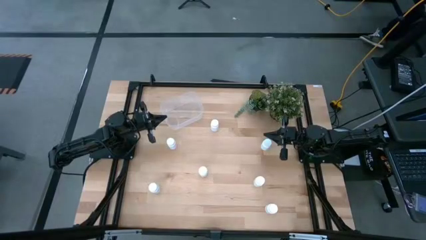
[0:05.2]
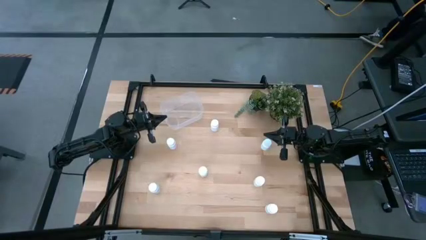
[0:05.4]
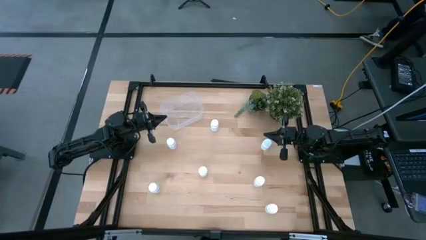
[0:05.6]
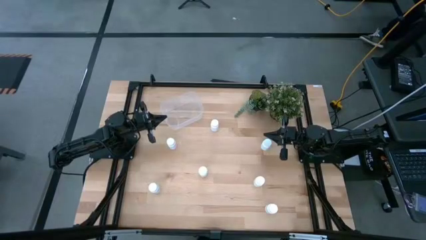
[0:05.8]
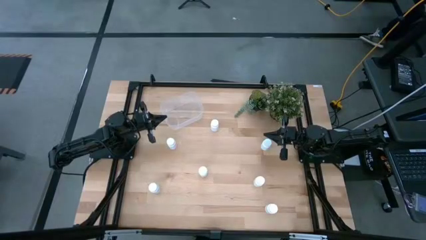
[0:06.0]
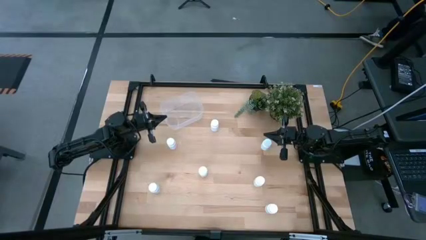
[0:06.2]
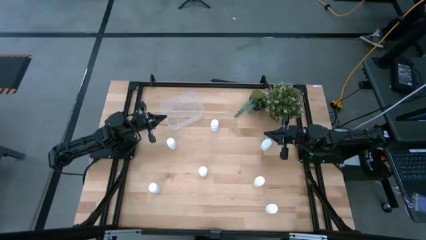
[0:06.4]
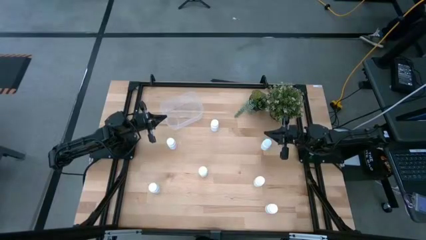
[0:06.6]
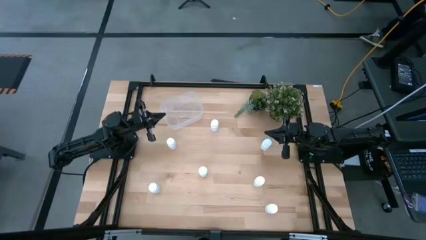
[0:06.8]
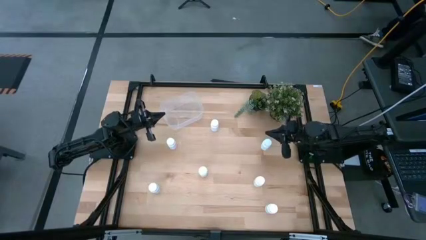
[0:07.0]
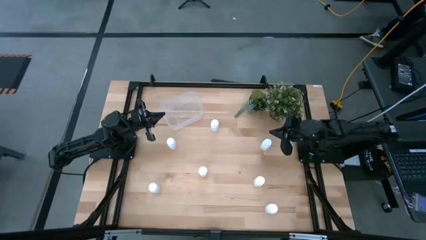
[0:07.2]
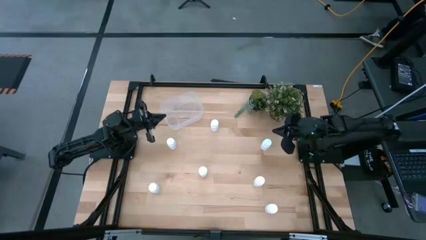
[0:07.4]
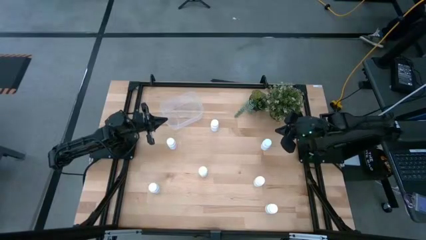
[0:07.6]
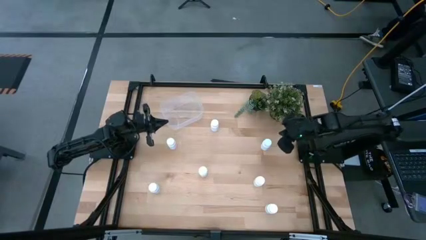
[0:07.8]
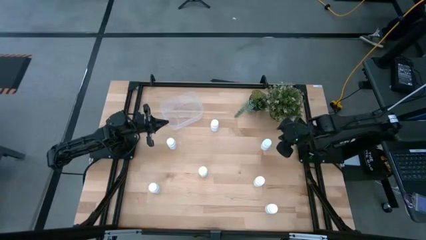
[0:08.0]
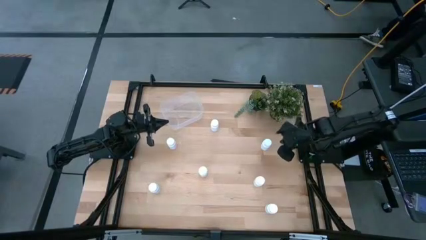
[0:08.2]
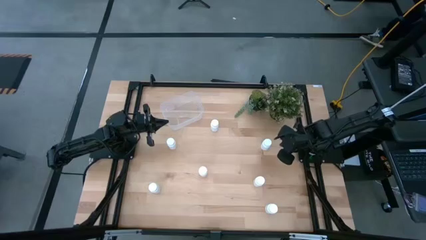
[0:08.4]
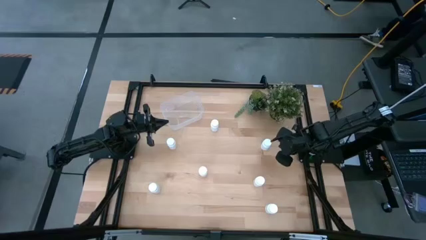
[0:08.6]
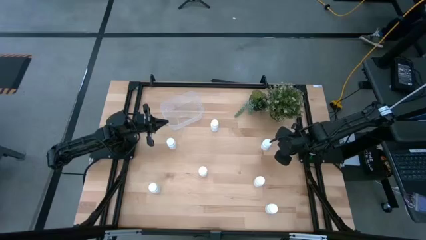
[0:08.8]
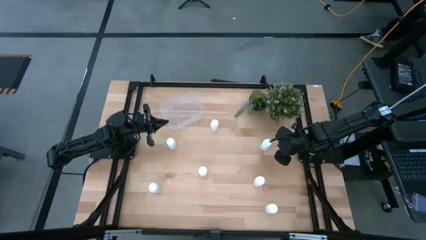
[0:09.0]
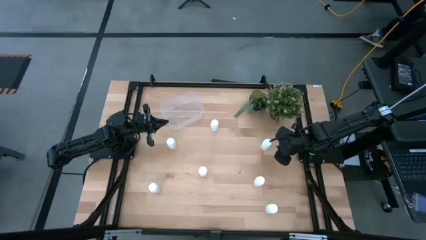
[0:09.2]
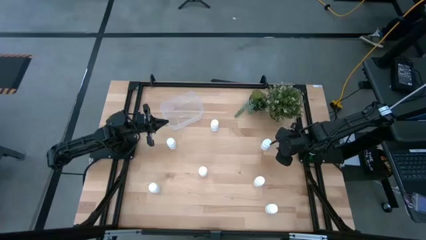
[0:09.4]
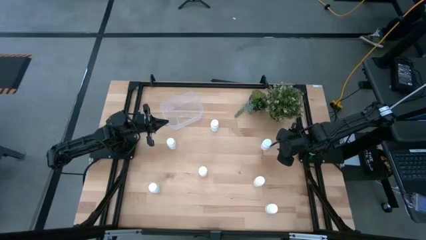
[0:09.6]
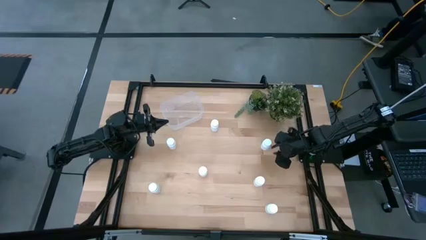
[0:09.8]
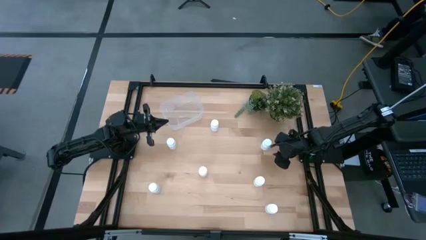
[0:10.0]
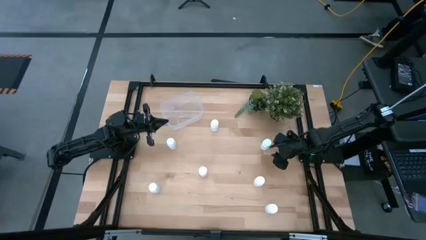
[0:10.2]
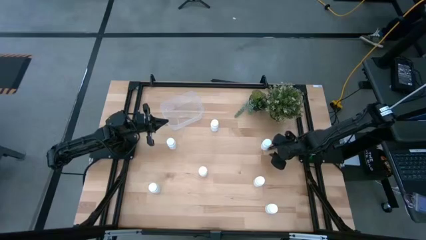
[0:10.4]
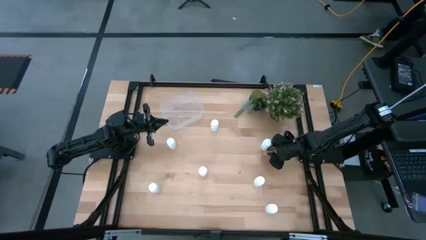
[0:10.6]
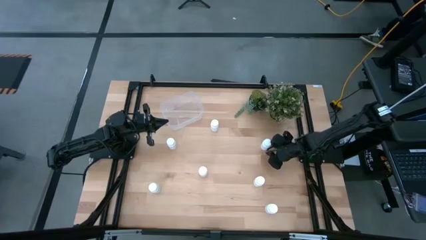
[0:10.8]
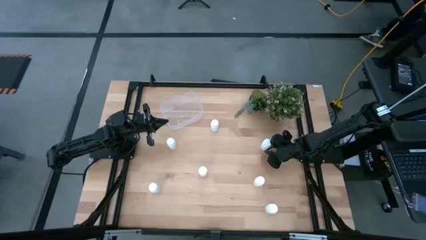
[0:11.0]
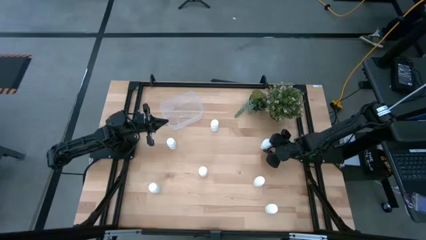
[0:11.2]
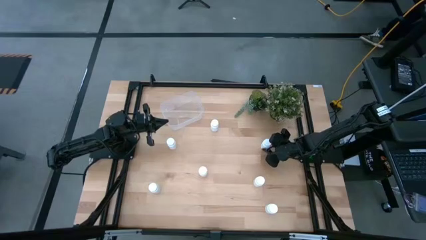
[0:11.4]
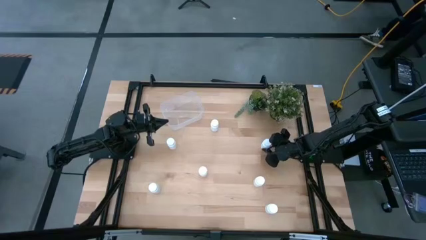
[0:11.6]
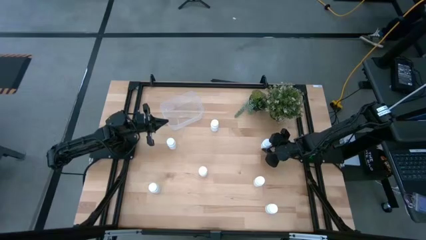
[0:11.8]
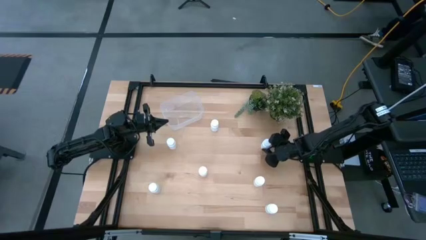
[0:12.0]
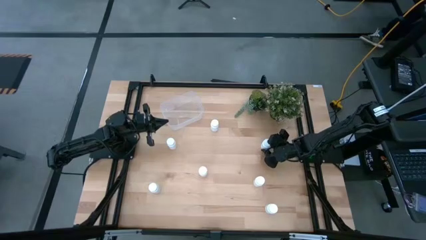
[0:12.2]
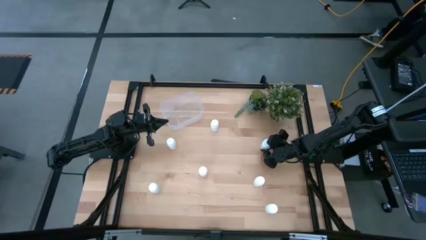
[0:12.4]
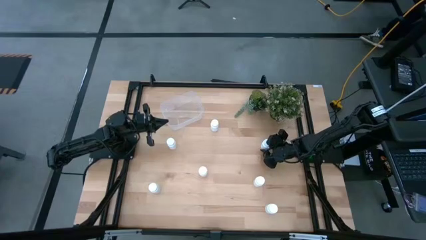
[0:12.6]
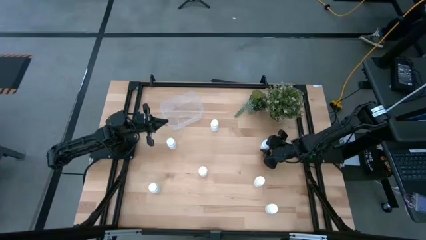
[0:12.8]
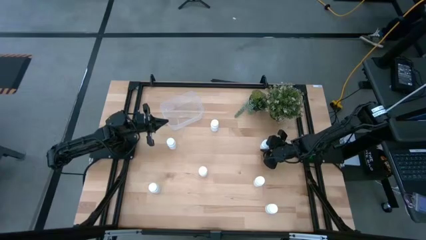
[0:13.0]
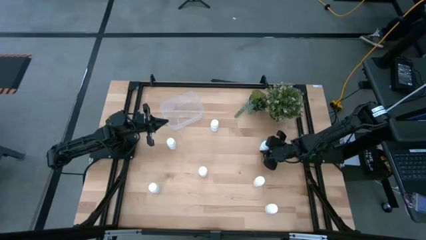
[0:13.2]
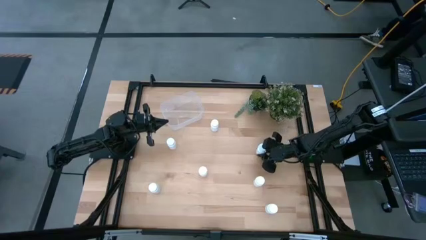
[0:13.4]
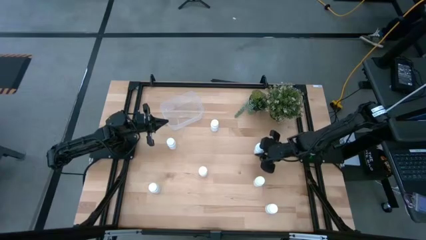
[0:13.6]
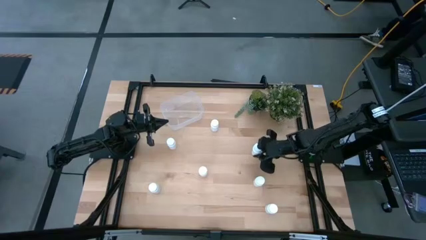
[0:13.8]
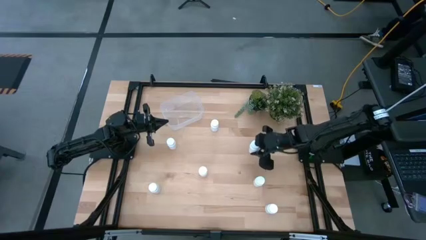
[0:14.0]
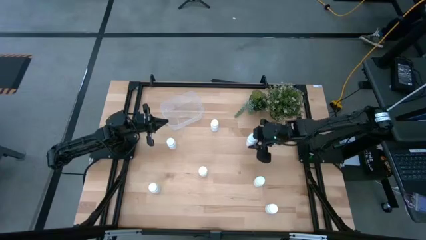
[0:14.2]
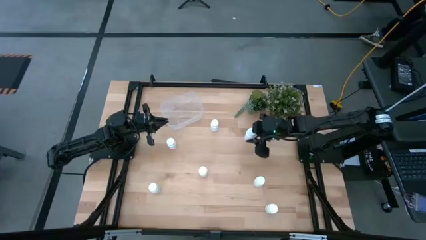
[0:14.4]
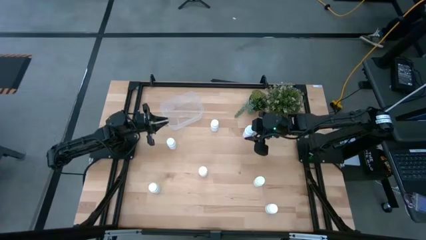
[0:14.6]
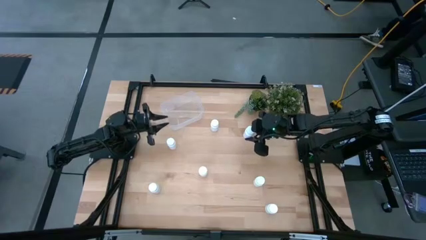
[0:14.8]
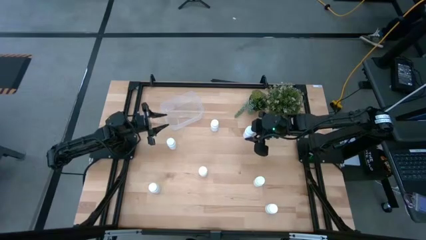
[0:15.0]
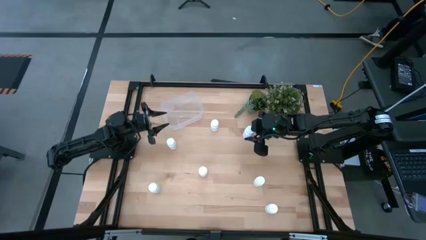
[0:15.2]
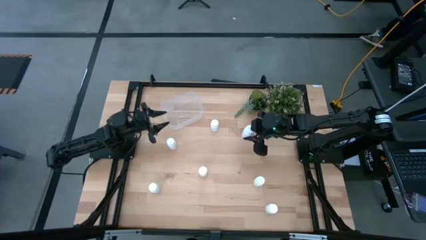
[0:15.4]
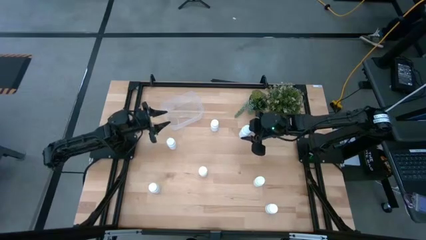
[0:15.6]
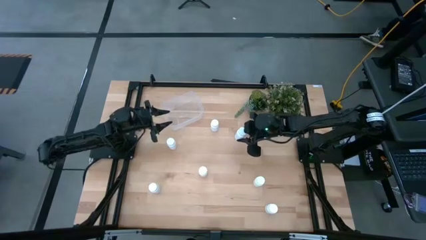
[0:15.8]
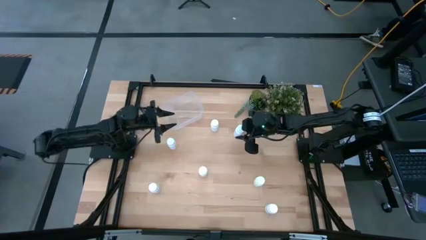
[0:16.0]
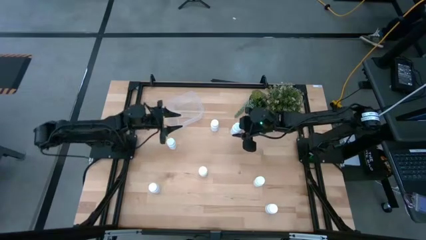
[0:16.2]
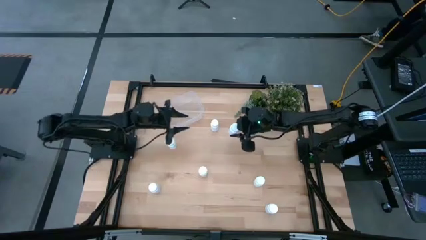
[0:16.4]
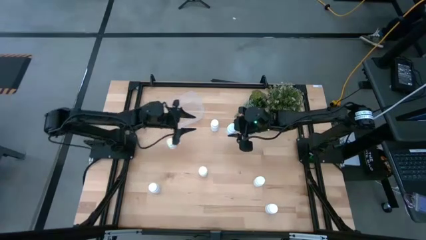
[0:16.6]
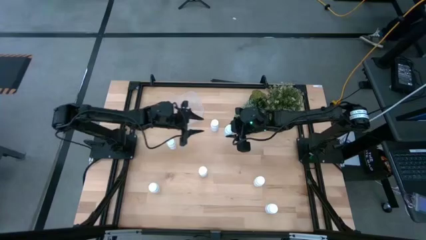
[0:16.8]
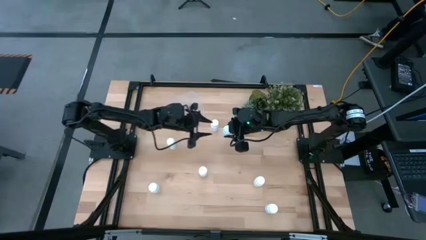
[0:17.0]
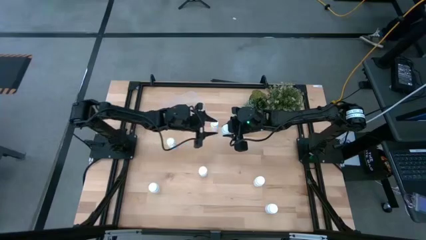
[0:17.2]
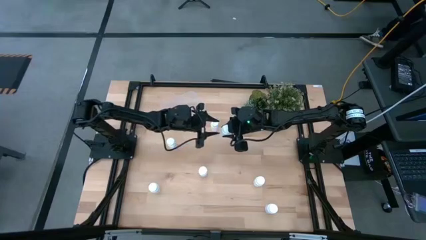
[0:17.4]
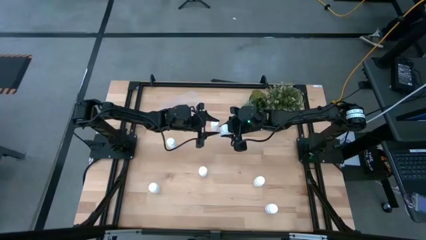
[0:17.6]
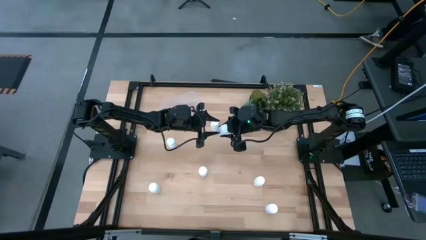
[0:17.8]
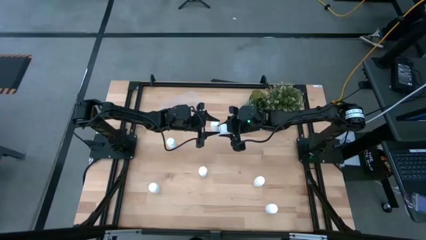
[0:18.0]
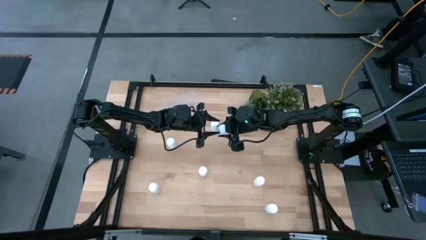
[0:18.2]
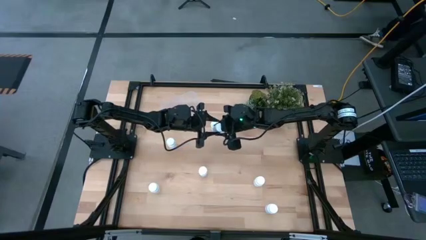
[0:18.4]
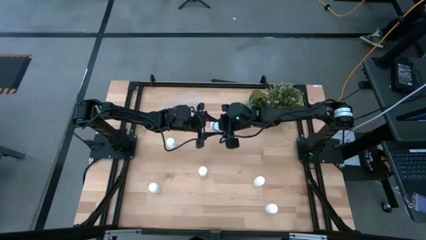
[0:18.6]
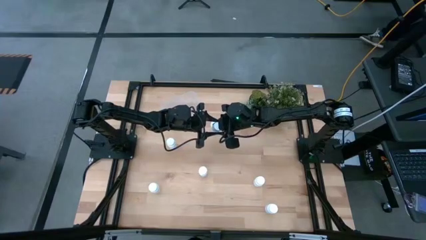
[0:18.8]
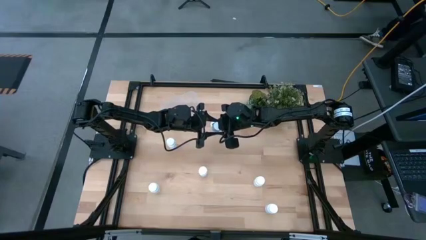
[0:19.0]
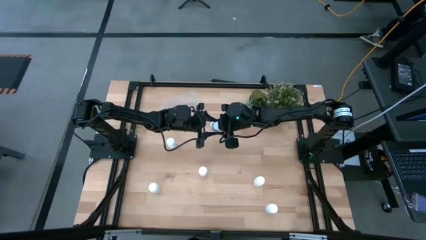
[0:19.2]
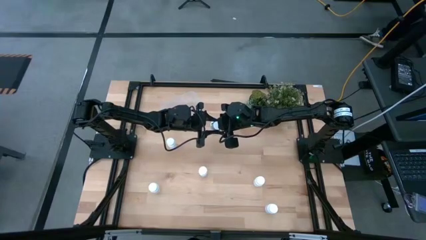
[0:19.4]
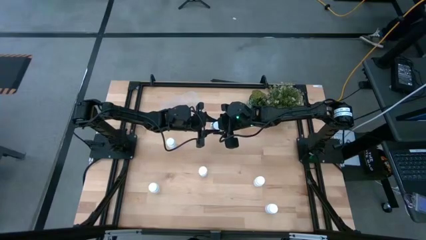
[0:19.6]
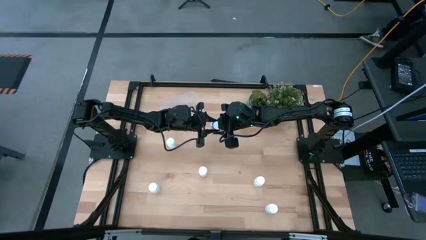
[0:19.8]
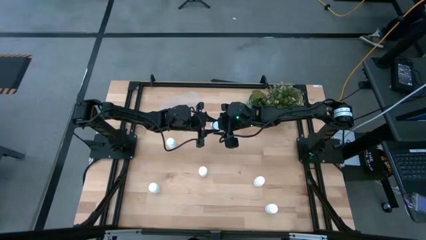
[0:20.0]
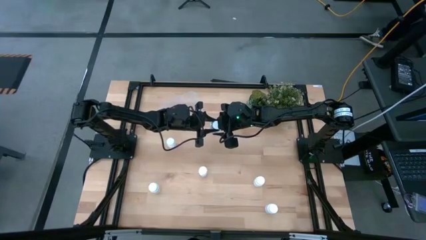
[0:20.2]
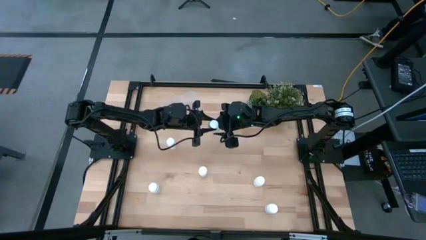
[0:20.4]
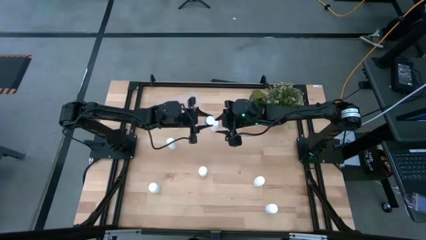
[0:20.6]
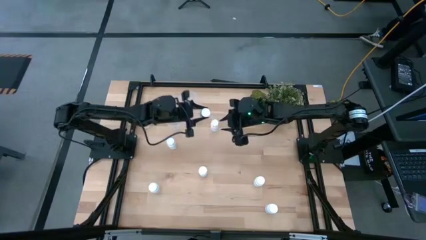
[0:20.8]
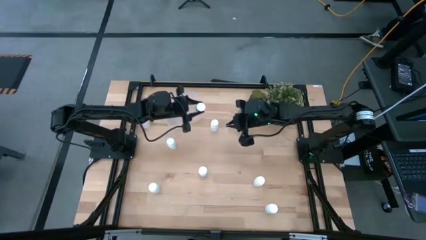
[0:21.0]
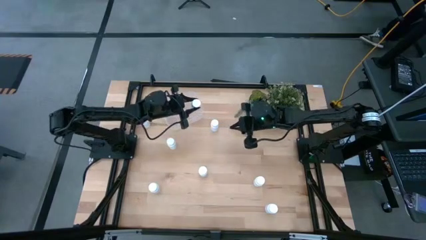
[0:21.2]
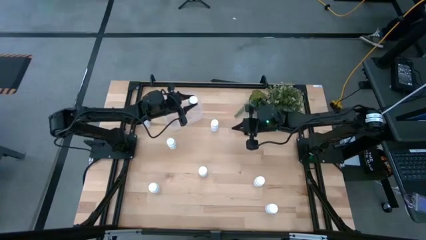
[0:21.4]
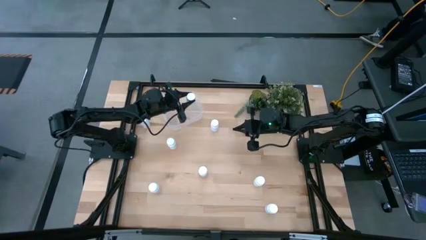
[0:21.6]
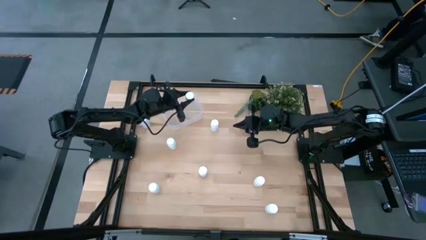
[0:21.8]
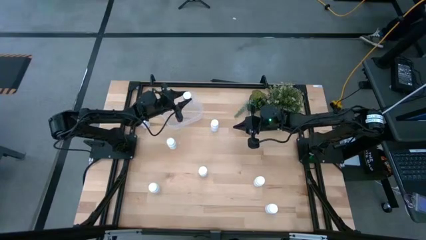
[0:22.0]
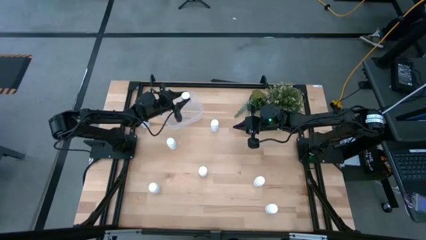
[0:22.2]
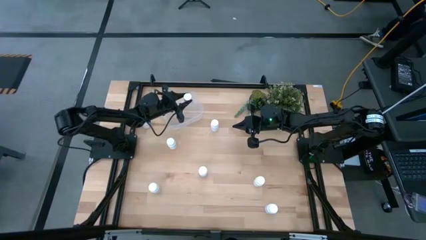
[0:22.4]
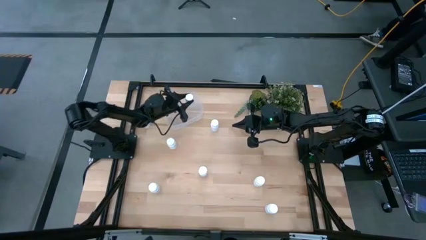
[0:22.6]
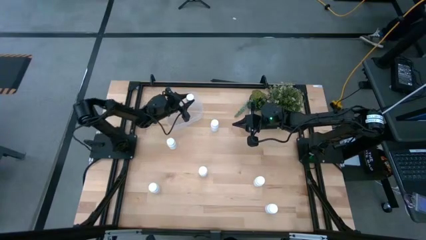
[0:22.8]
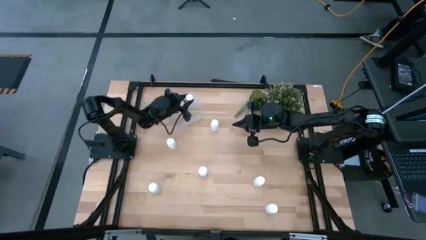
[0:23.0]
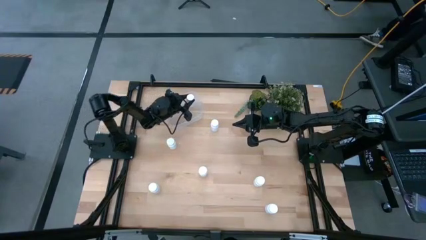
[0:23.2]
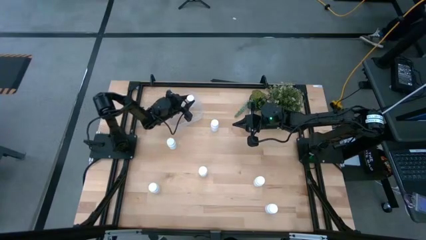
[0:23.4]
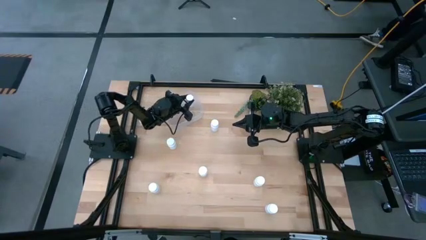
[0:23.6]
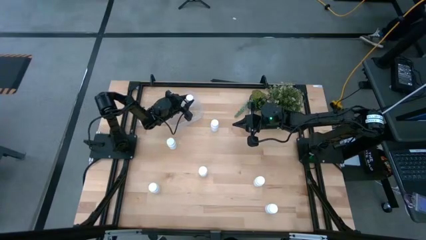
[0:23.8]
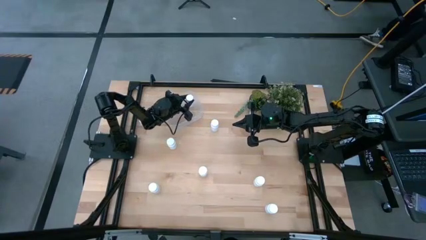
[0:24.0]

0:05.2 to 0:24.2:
Task: Pick and place pill bottles into a basket
Put the white medicine bottle into the transparent bin
